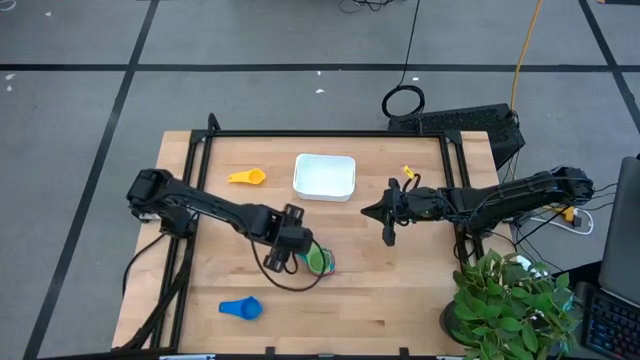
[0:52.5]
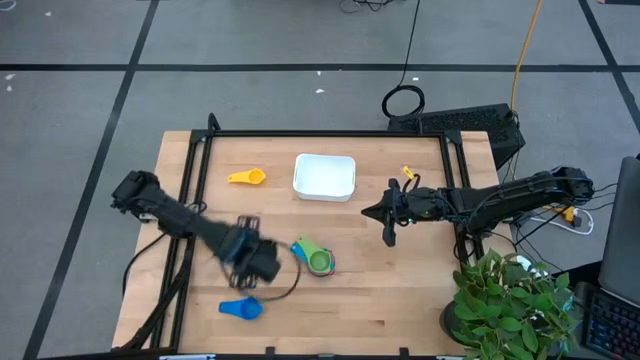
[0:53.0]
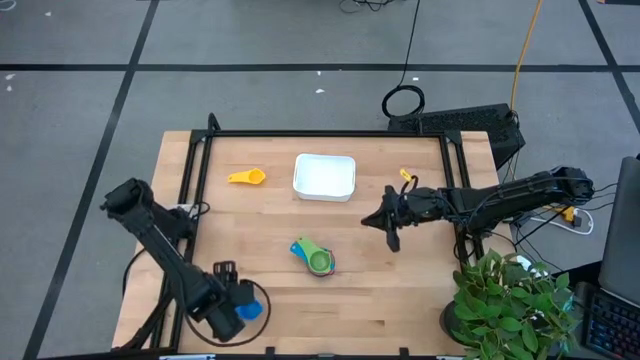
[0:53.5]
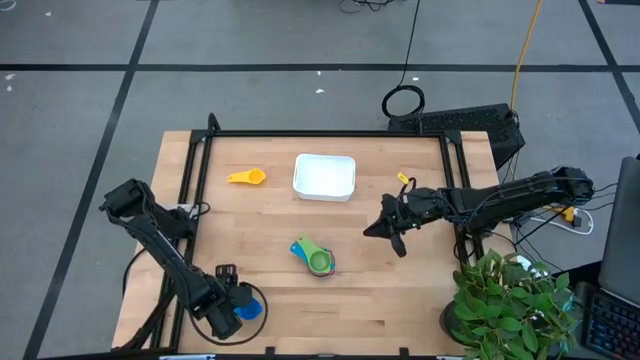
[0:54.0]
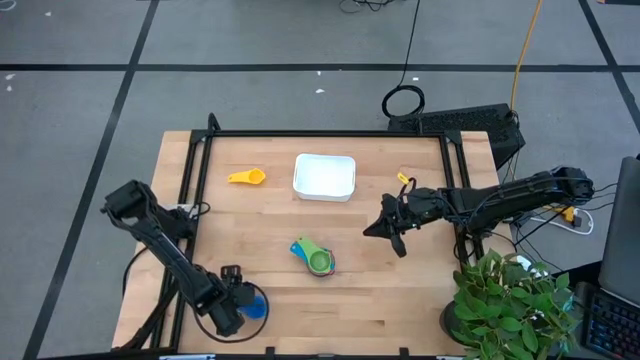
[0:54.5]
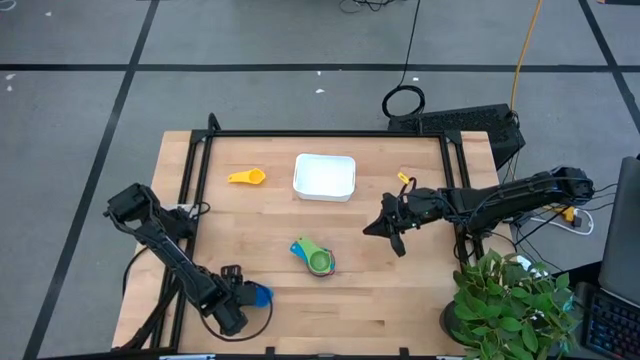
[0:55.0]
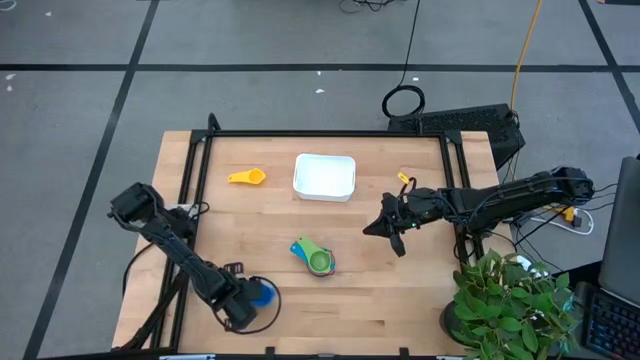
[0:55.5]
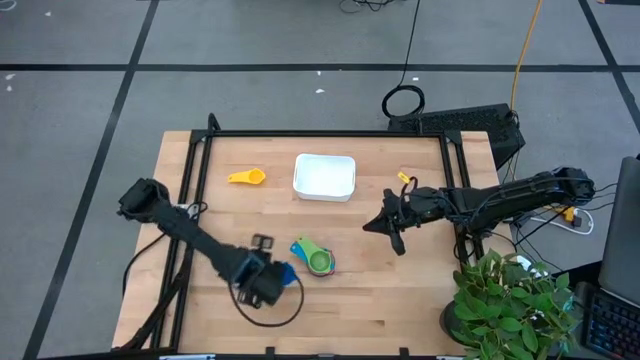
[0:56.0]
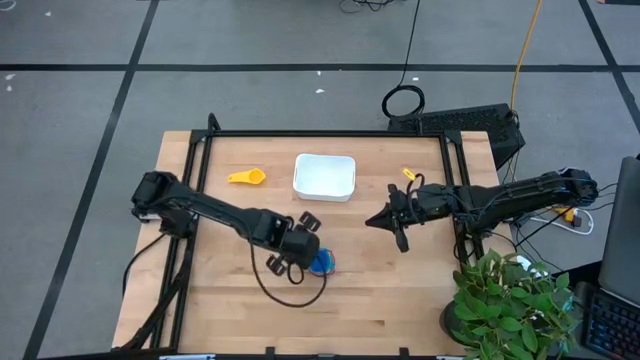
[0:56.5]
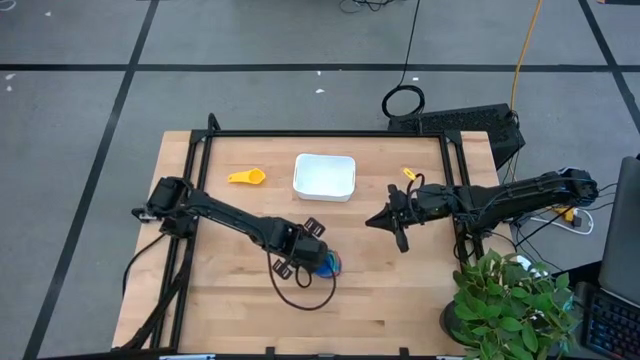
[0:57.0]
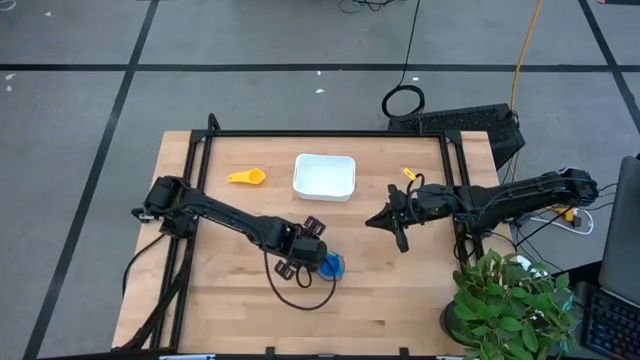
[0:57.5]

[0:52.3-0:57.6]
Task: Nest measuring cups in basket
Stack the blue measuring cup on top of the green measuring cup

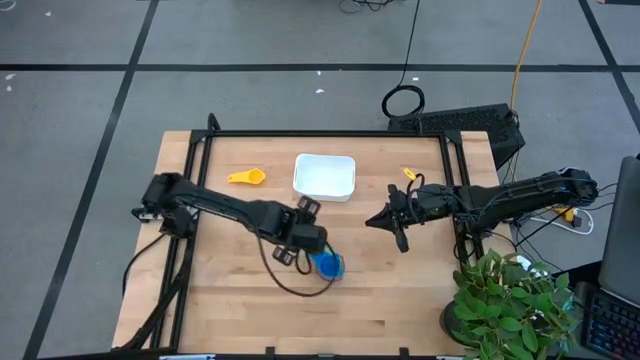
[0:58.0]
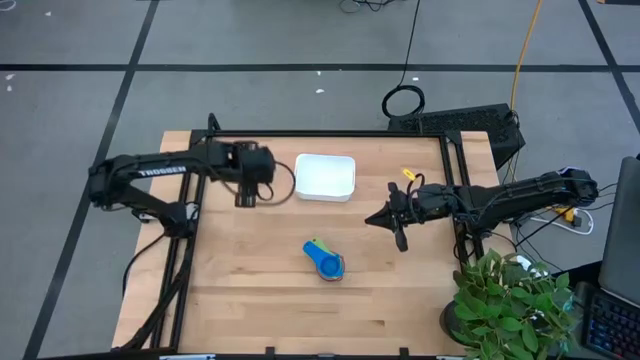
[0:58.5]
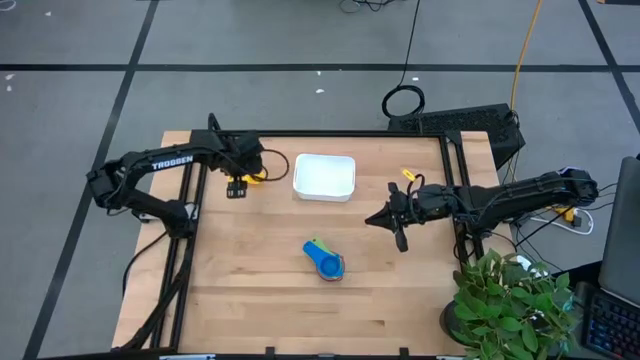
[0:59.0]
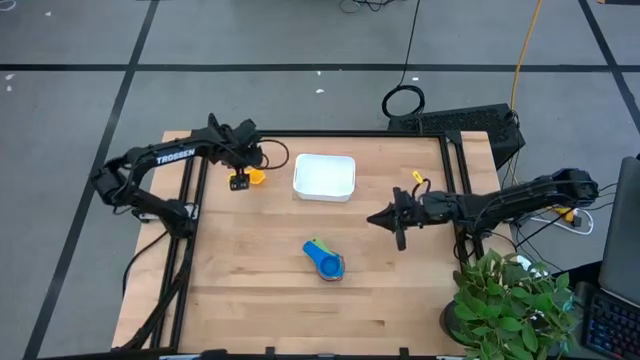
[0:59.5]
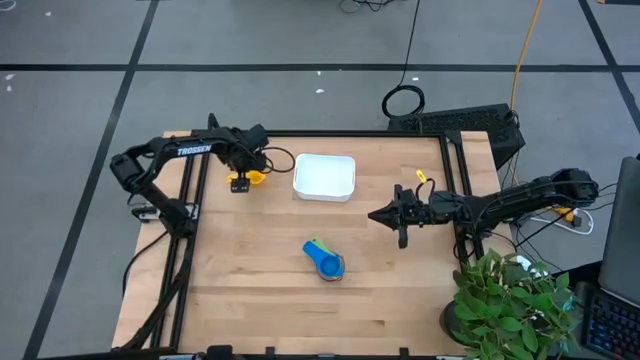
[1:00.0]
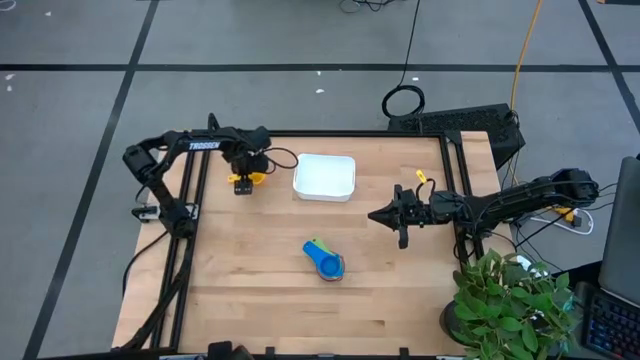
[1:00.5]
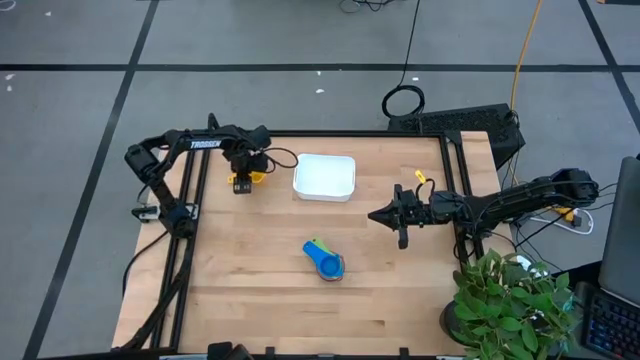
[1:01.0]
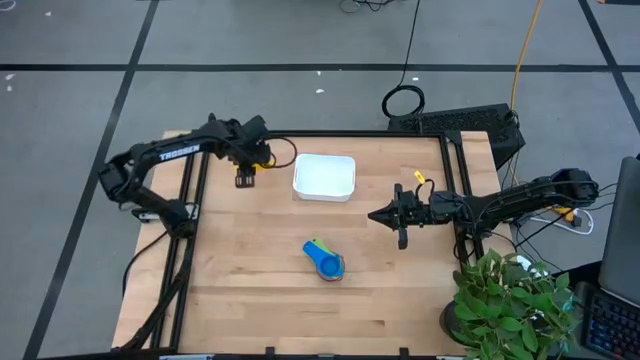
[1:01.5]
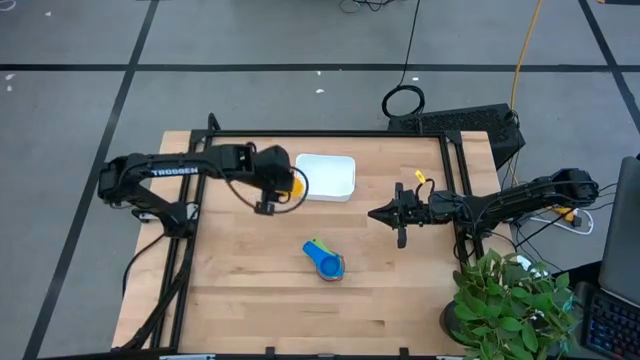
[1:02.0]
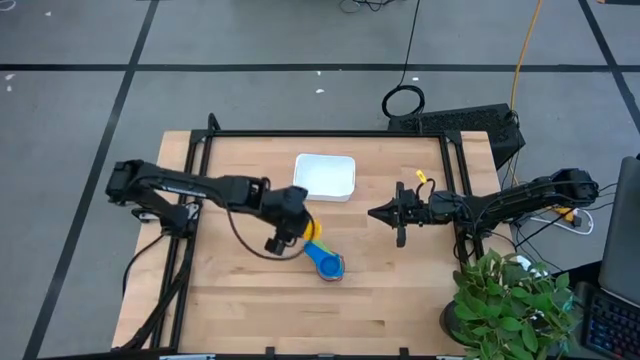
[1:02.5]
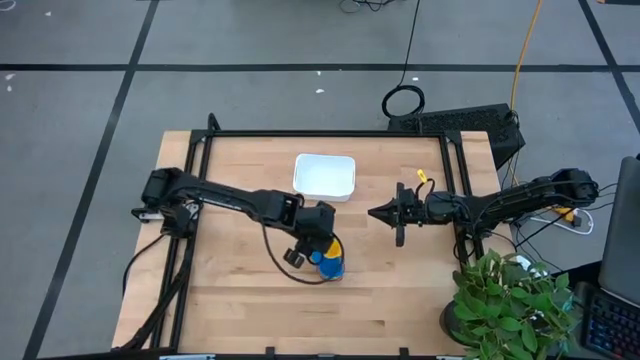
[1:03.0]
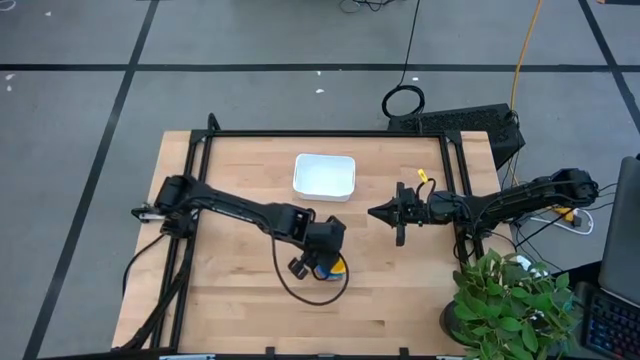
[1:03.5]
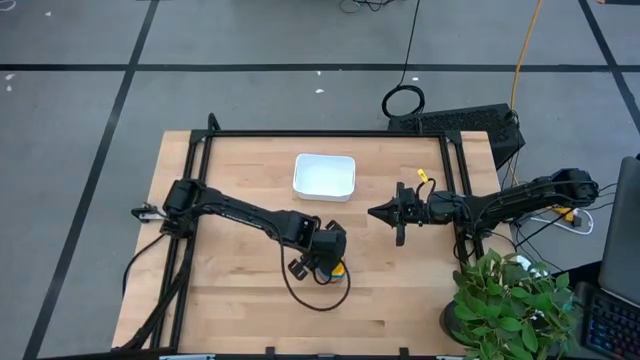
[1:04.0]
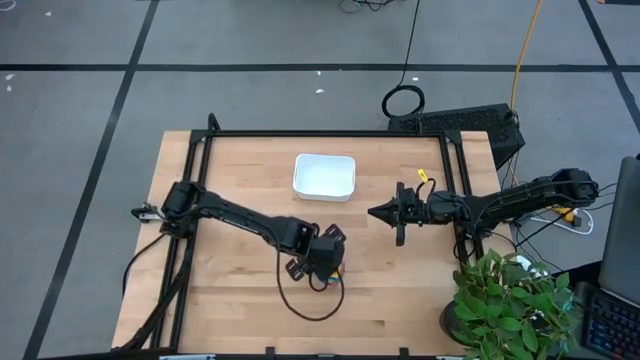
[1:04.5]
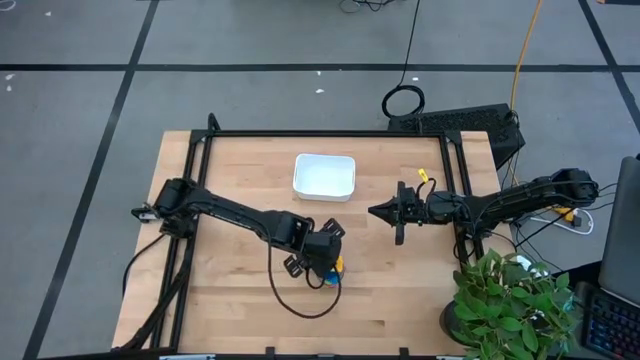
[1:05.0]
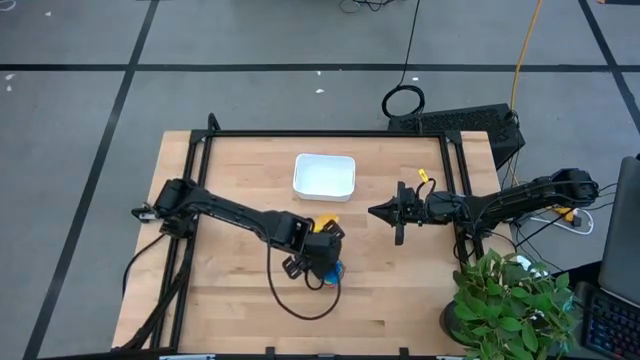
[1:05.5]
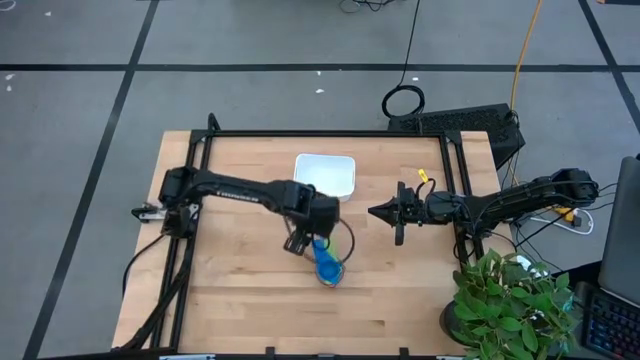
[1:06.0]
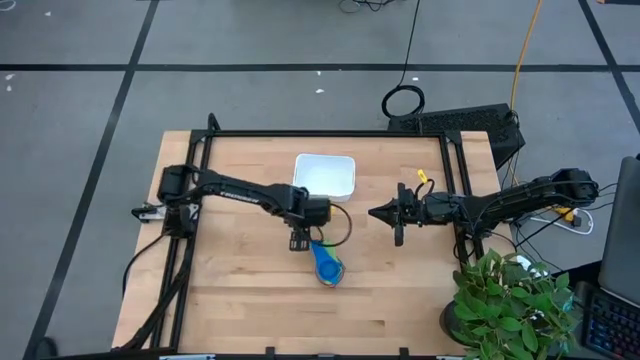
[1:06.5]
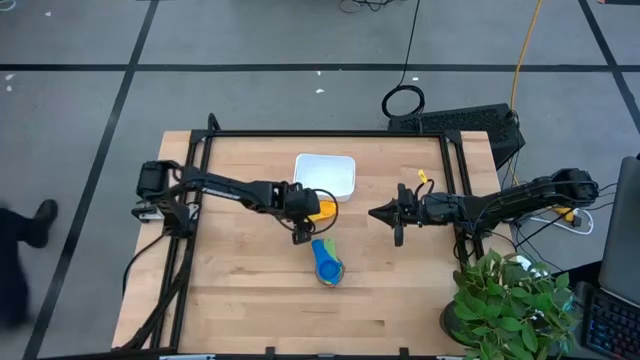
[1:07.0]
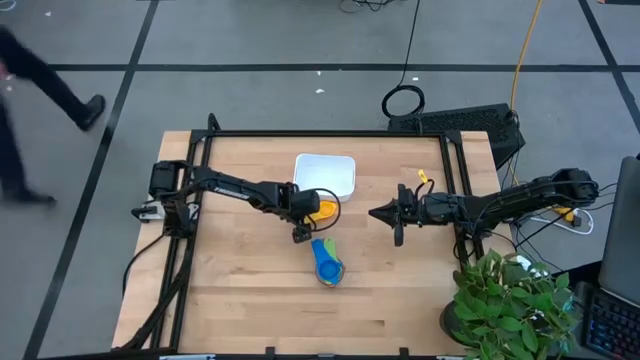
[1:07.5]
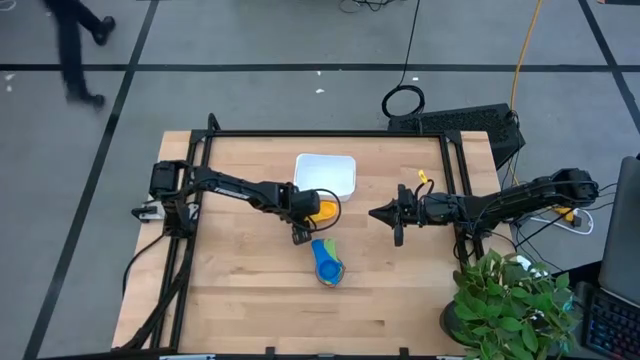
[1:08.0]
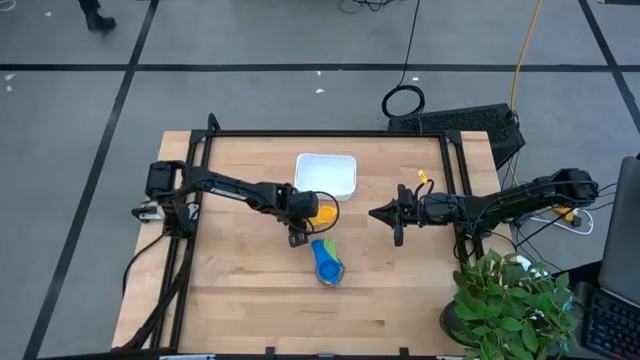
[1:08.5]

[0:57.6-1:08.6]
Stack the yellow measuring cup on top of the blue measuring cup

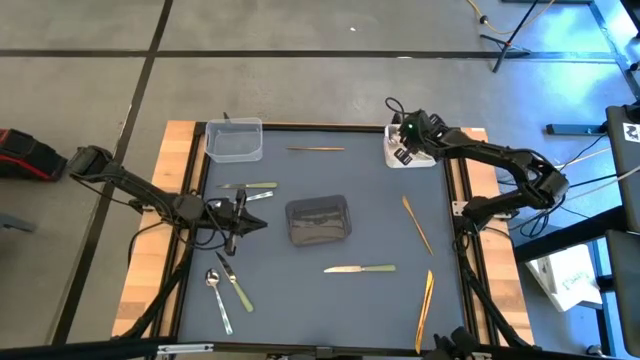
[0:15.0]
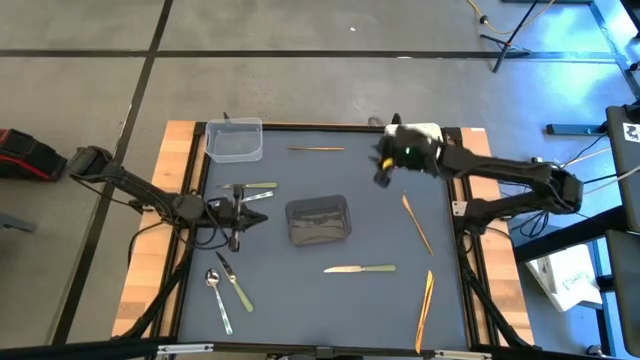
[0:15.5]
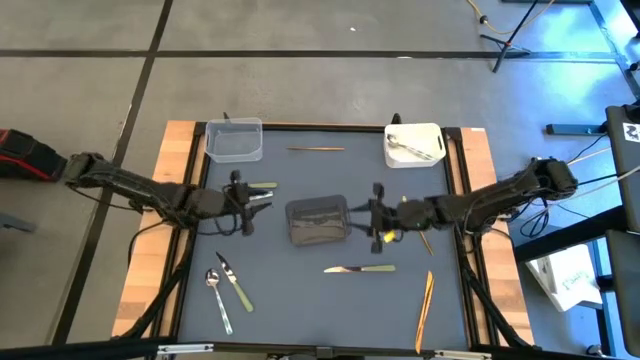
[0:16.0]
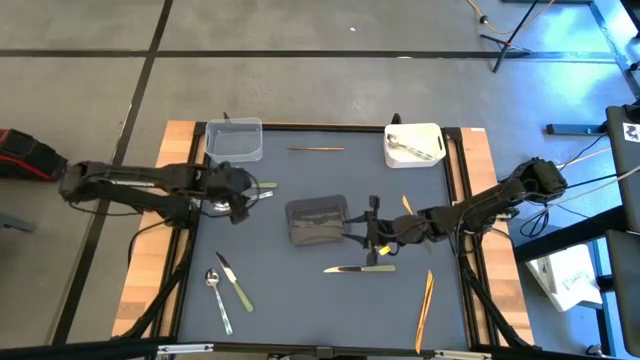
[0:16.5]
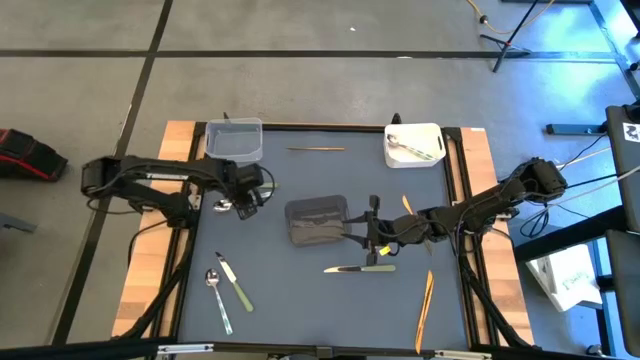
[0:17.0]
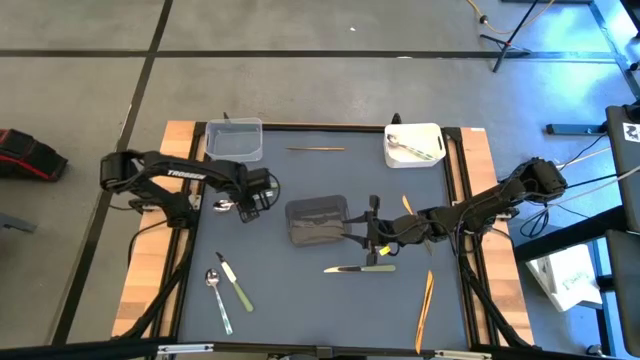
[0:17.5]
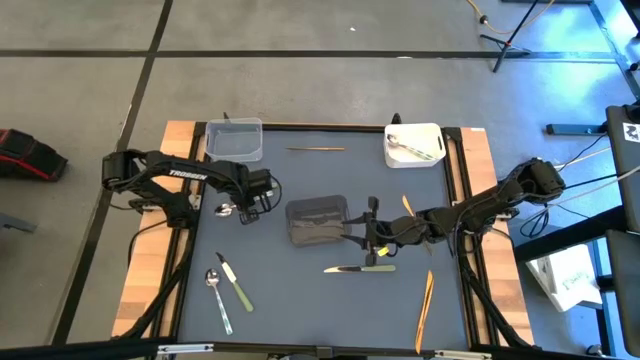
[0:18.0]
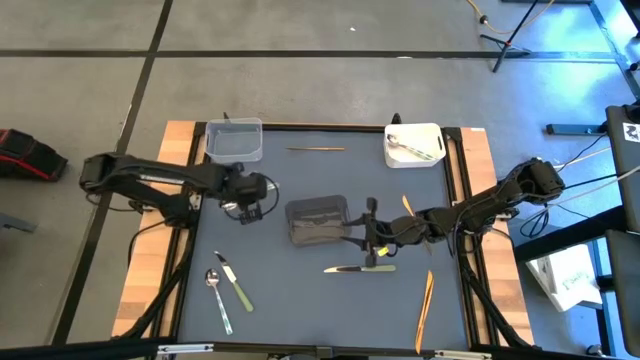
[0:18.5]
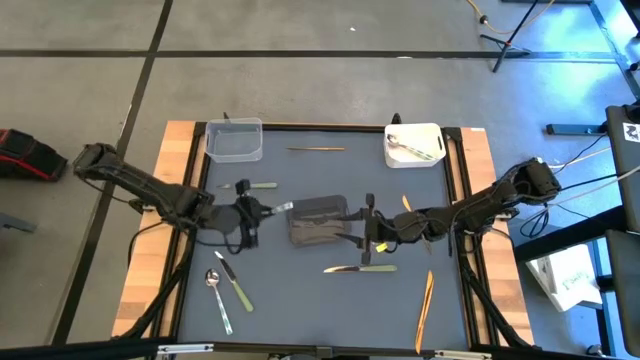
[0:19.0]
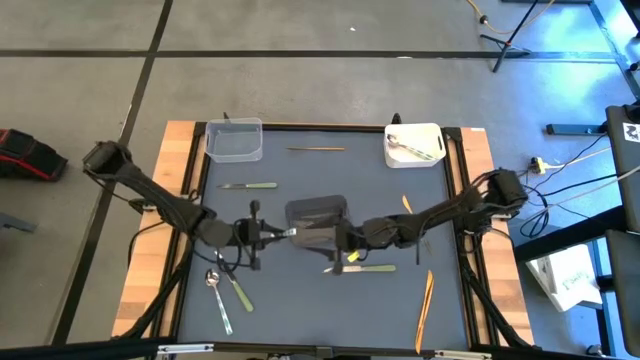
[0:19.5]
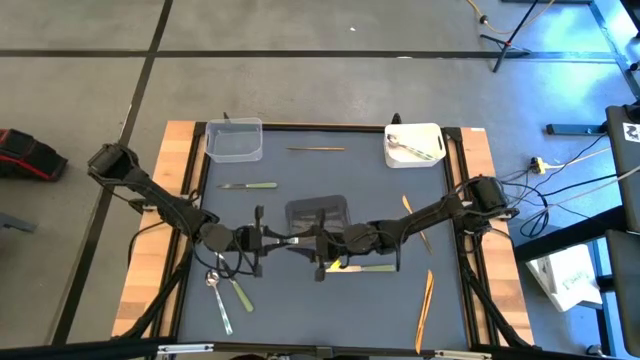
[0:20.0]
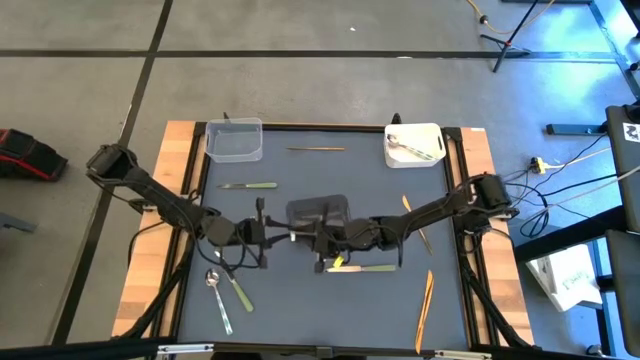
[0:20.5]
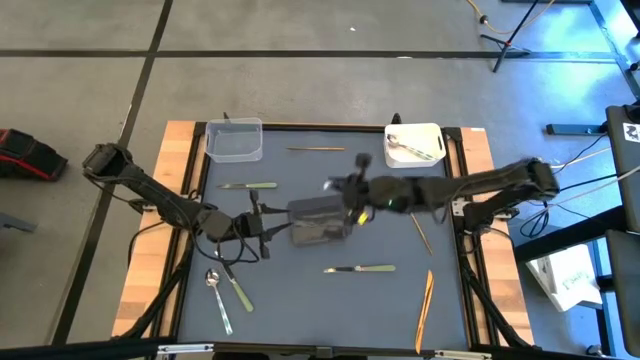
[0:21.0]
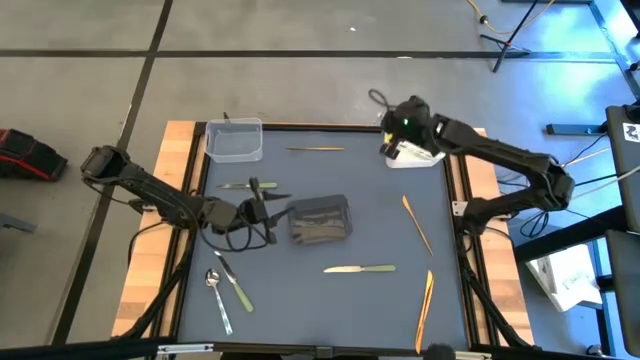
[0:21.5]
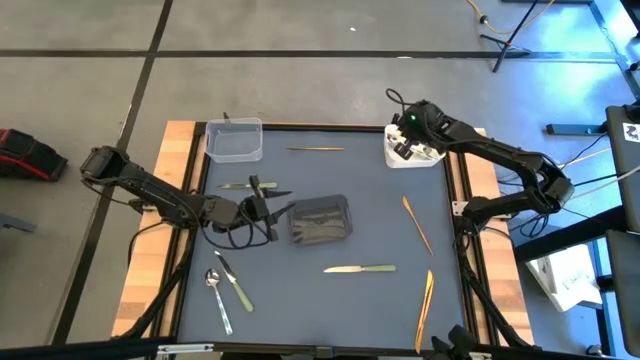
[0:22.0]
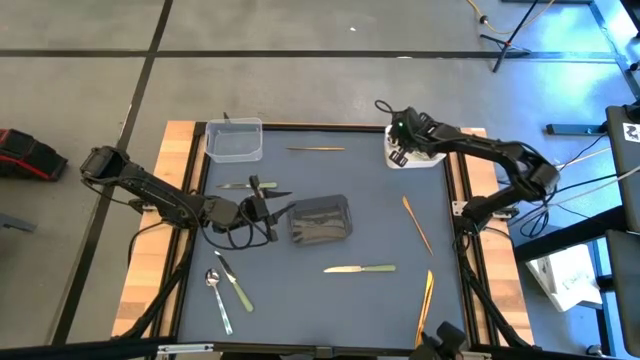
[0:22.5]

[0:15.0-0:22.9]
Task: Sort silverware by color (type)
Put the white green spoon into the white bin
